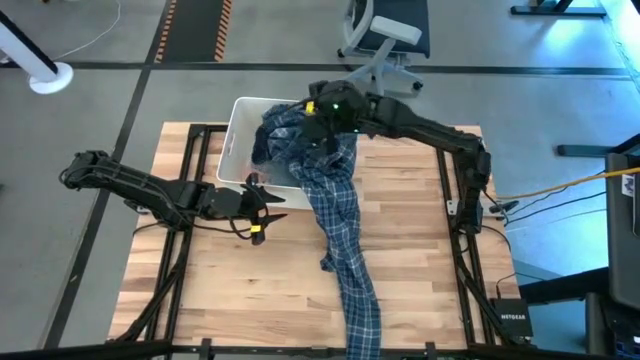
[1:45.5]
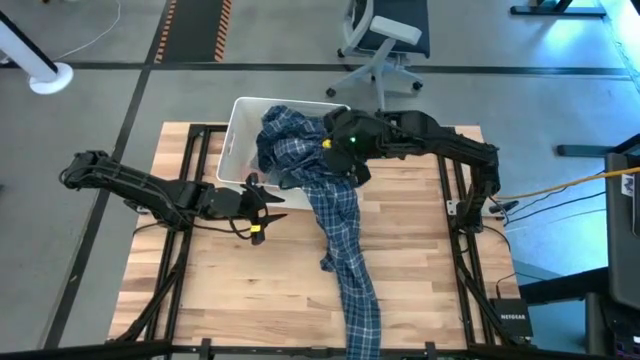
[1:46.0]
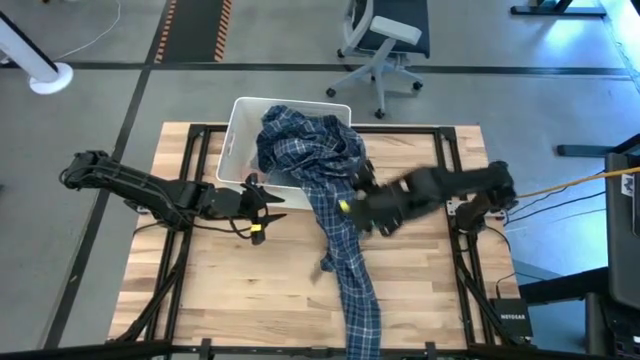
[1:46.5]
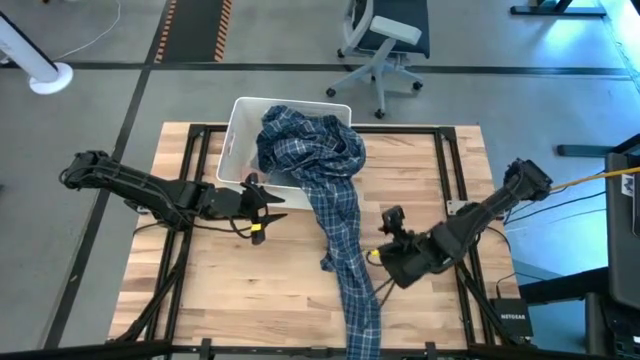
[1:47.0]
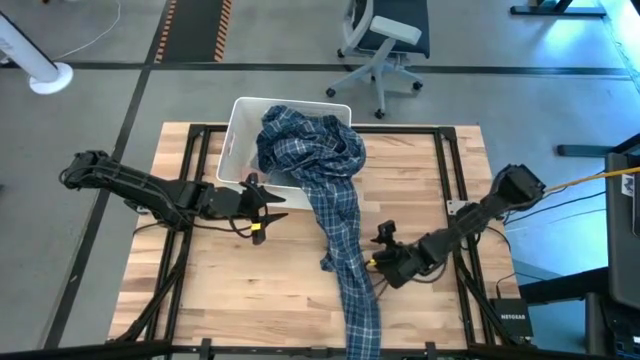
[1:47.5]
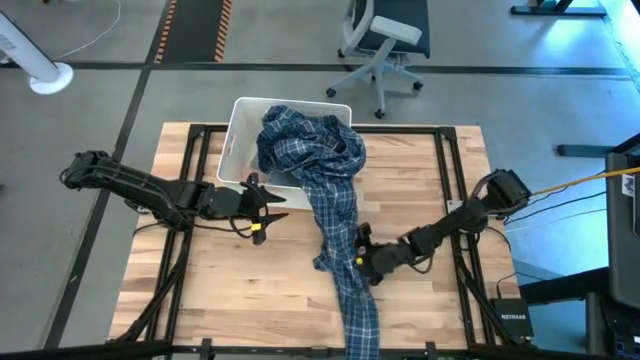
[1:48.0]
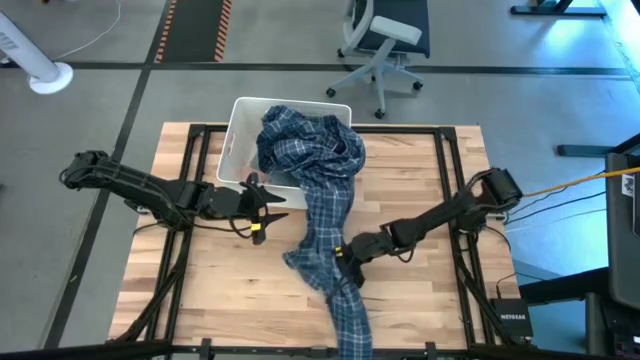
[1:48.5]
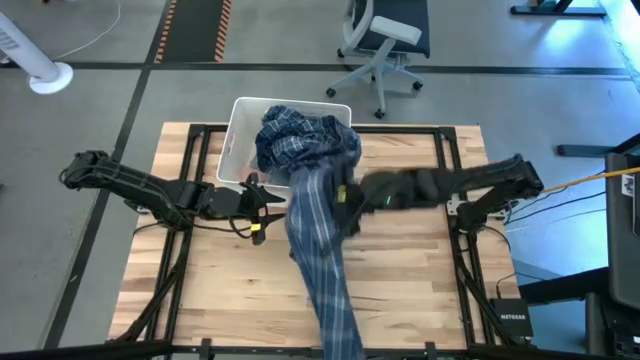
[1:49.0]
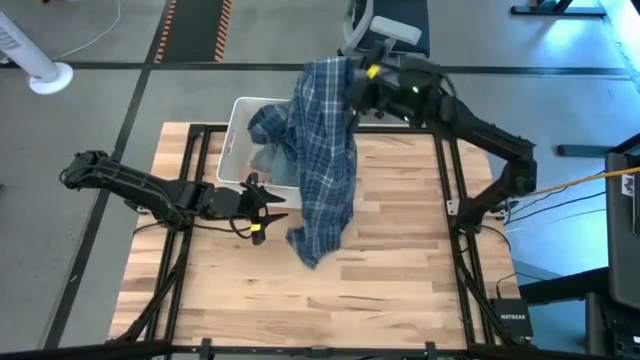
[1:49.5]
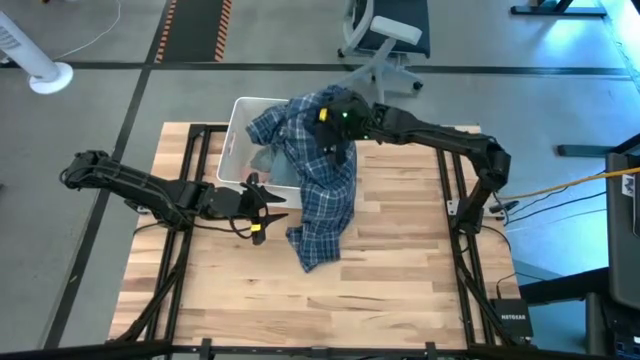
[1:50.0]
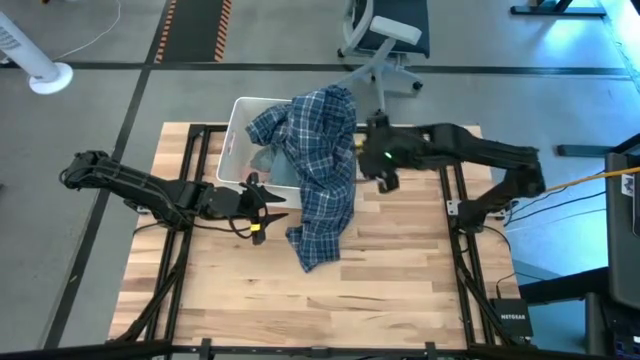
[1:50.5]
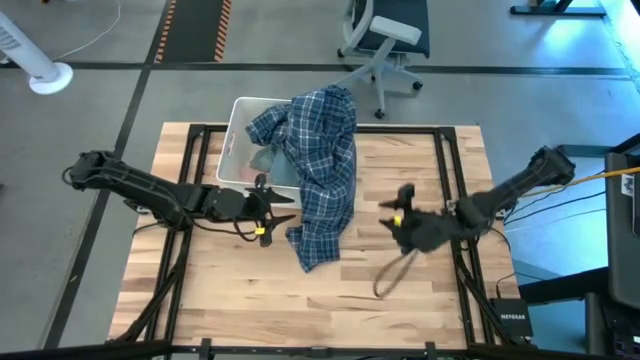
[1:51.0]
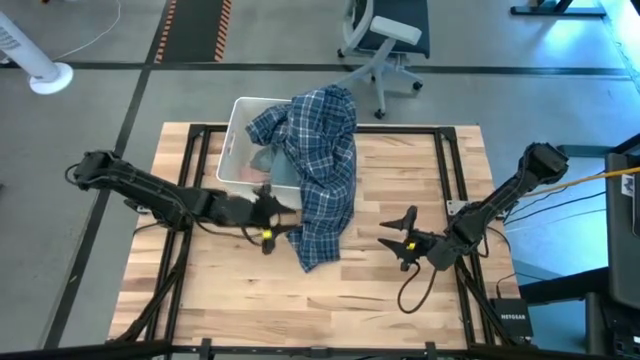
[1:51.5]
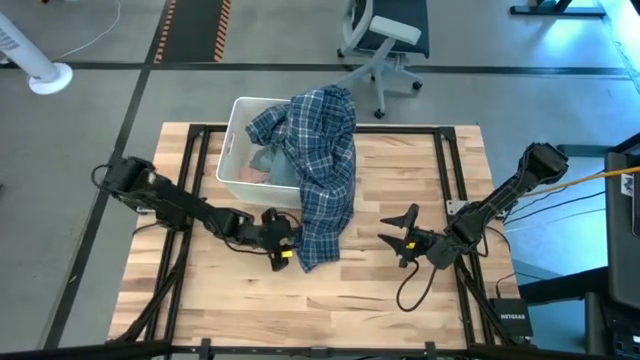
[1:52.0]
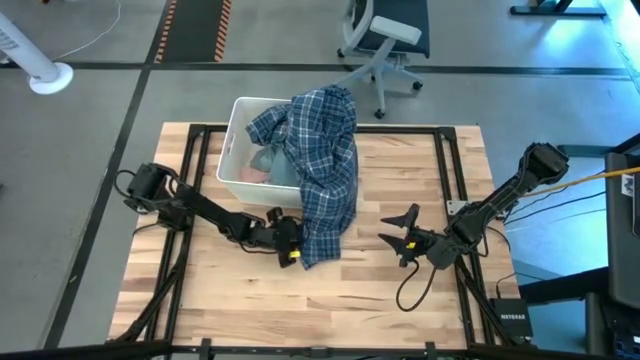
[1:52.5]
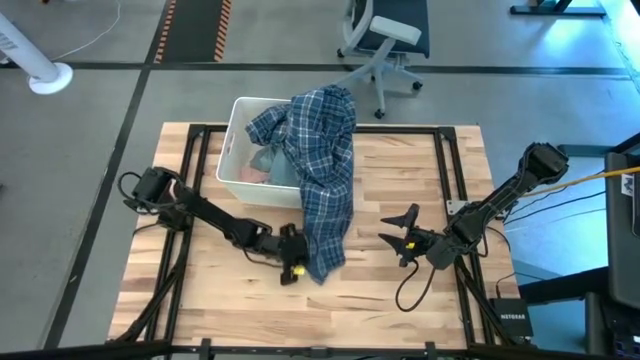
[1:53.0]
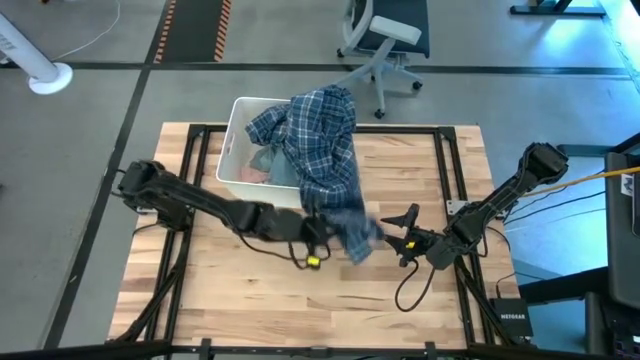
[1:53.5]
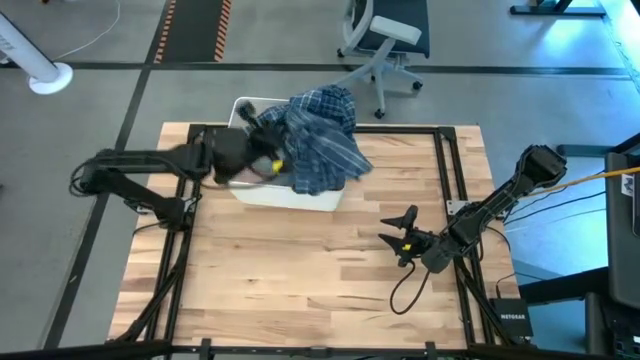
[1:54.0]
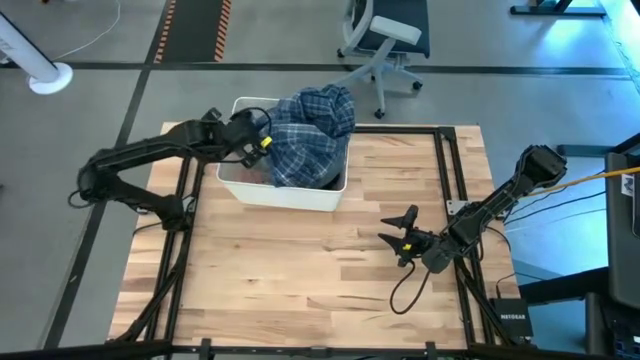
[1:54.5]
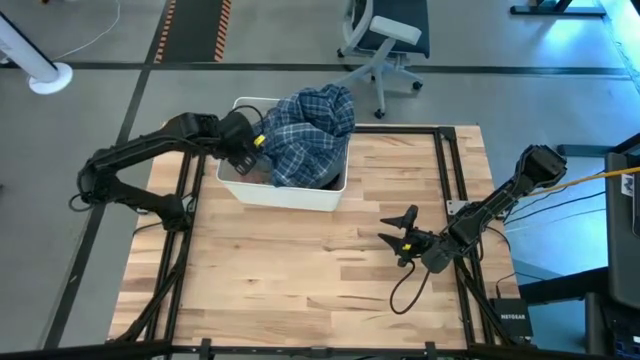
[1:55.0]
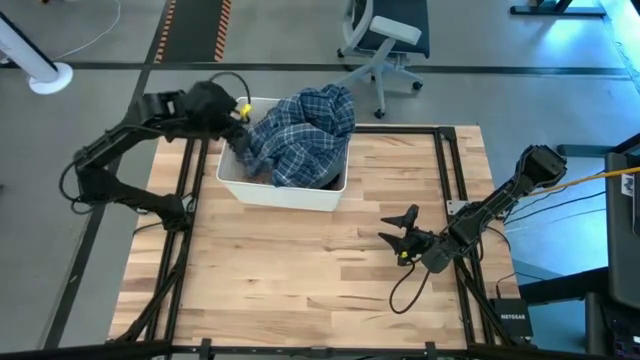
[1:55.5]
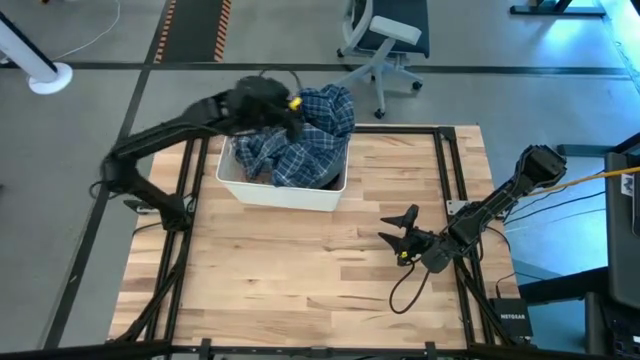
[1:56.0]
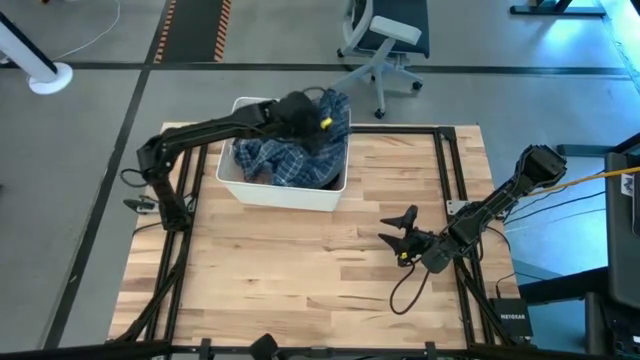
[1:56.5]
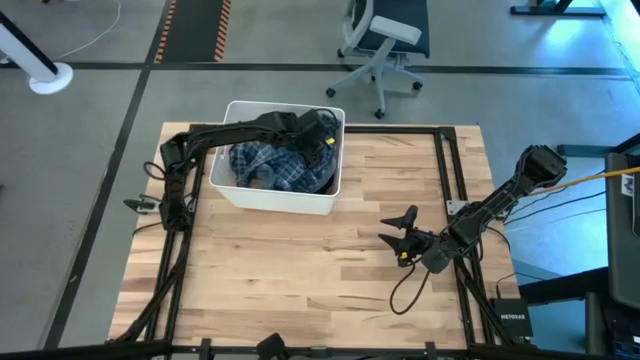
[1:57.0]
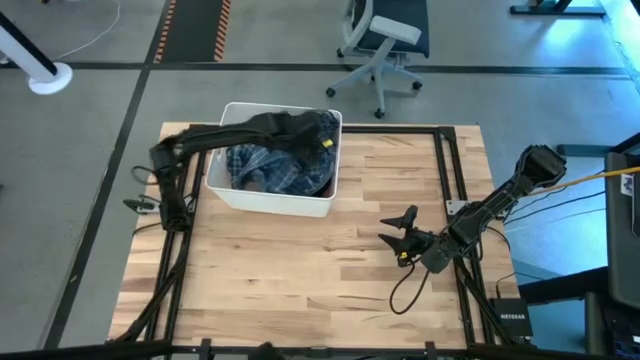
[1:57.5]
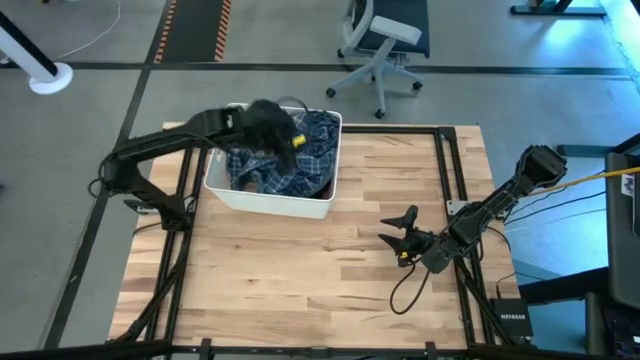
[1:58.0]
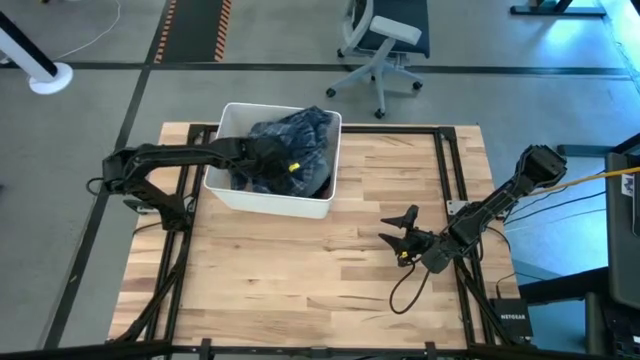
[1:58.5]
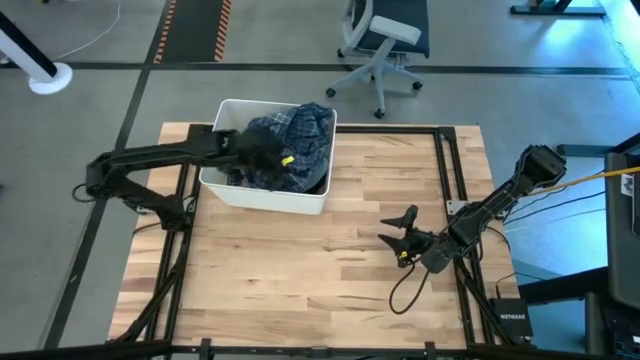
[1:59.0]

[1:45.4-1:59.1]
Task: Sort clothes
Put the blue patterned pants to the top right of the table

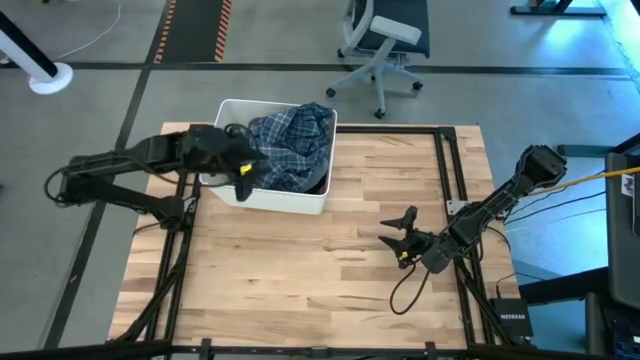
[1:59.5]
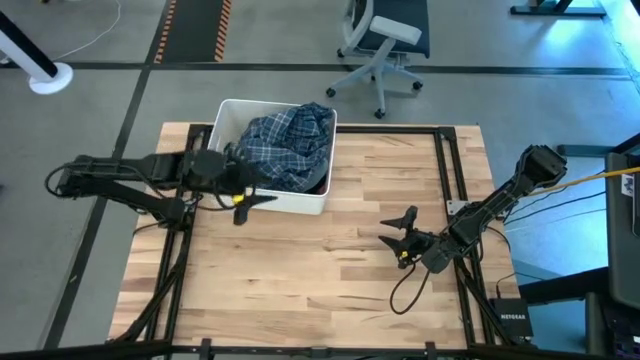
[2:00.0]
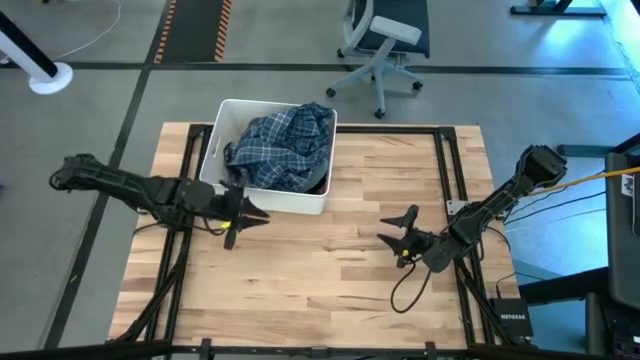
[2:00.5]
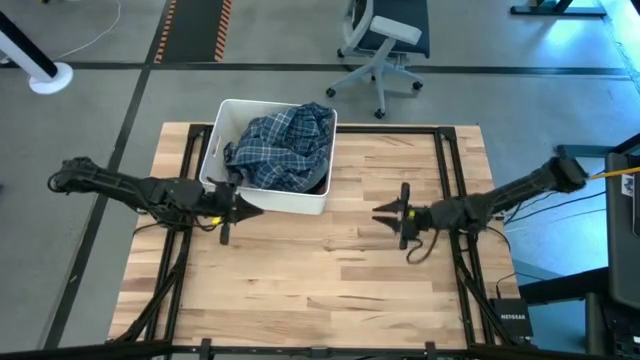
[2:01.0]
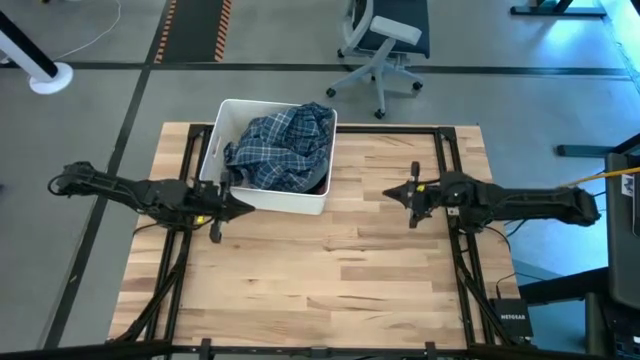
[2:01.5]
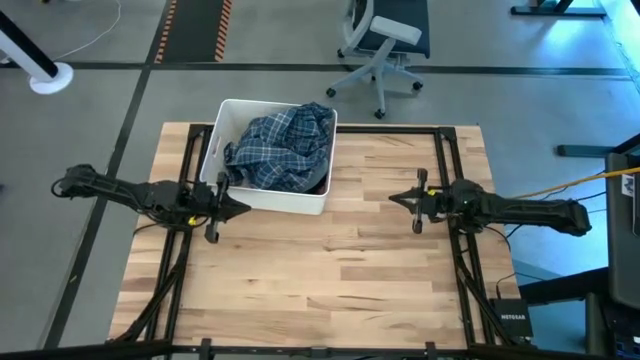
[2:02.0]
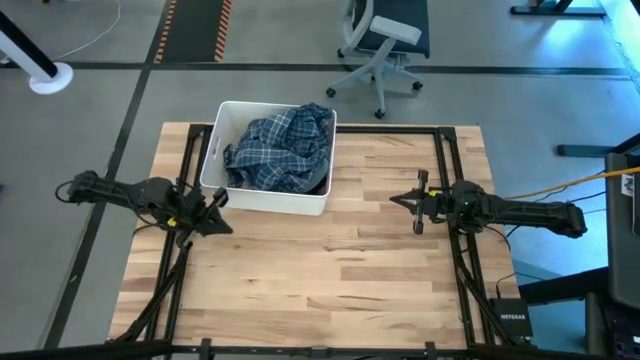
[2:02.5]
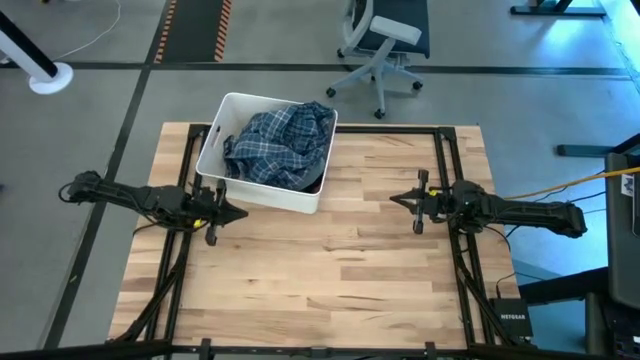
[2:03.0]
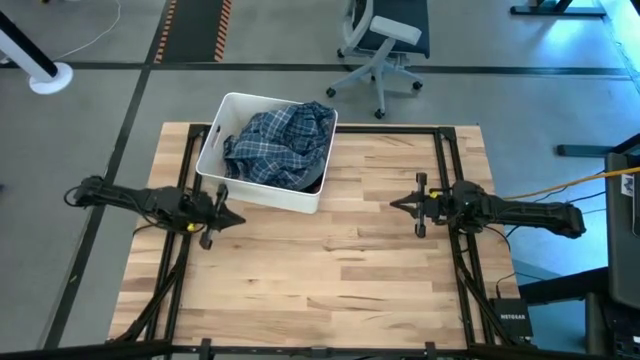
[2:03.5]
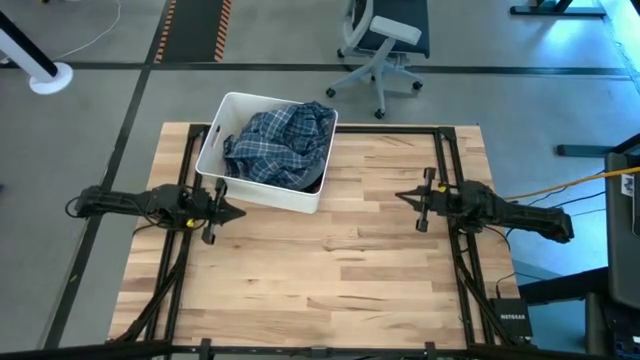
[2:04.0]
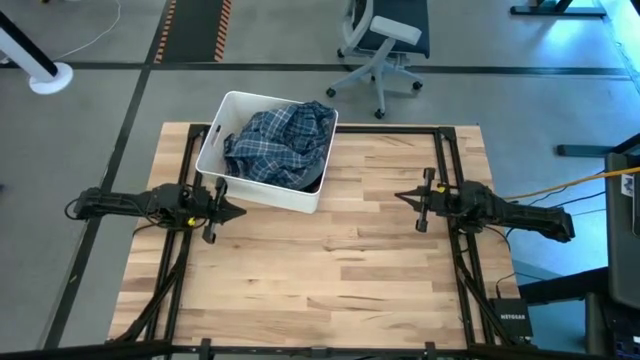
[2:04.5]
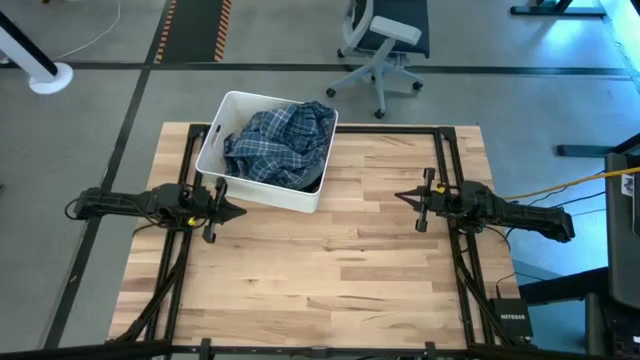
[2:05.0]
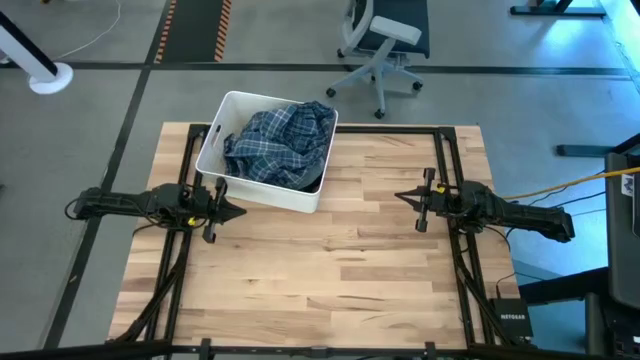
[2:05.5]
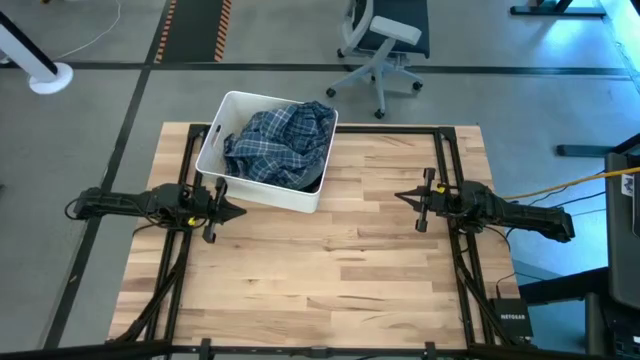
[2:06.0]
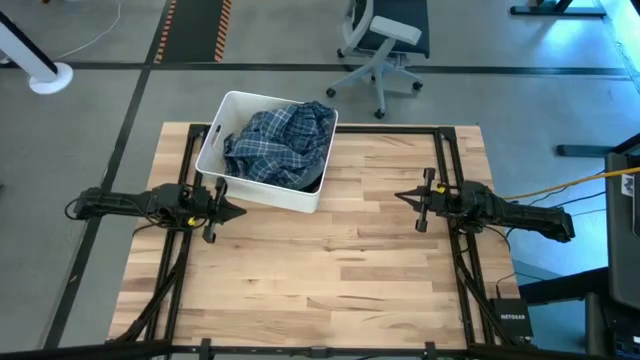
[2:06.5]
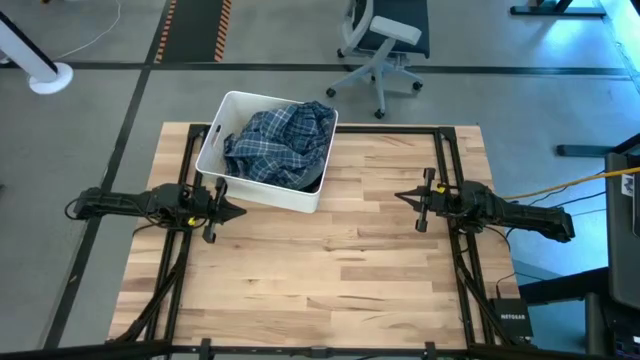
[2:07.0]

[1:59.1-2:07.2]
Return to Home Position
